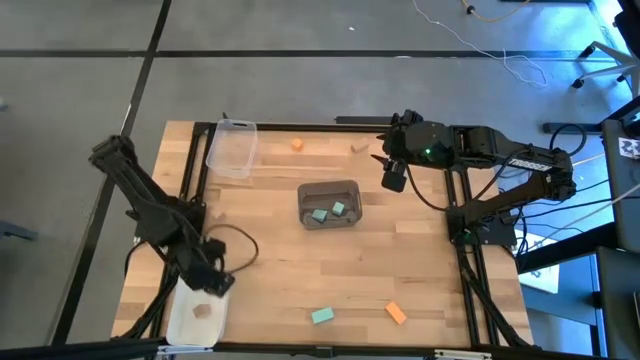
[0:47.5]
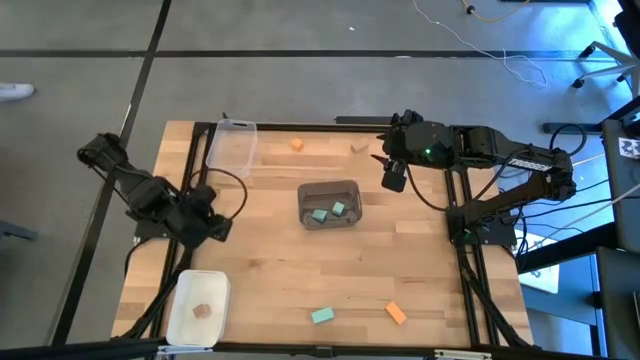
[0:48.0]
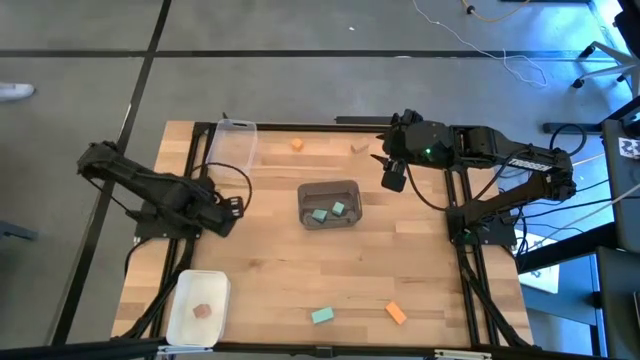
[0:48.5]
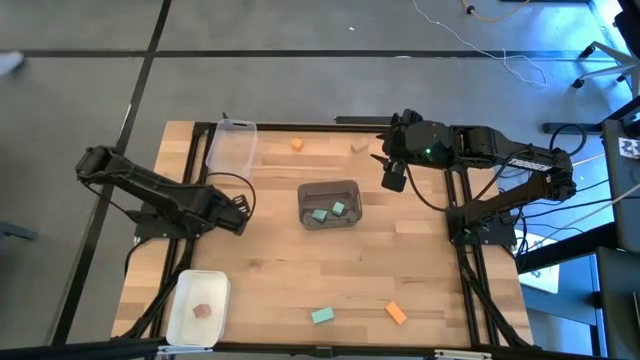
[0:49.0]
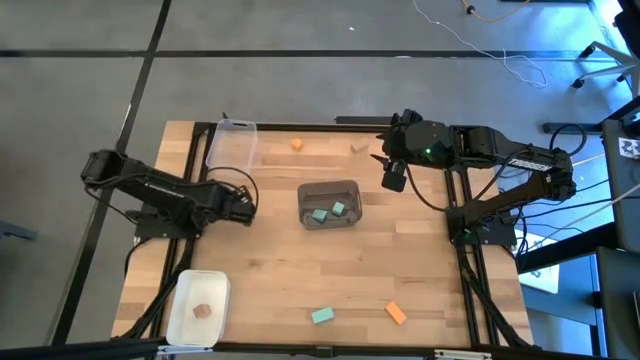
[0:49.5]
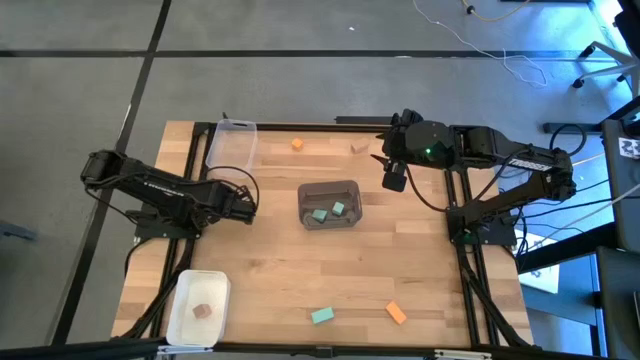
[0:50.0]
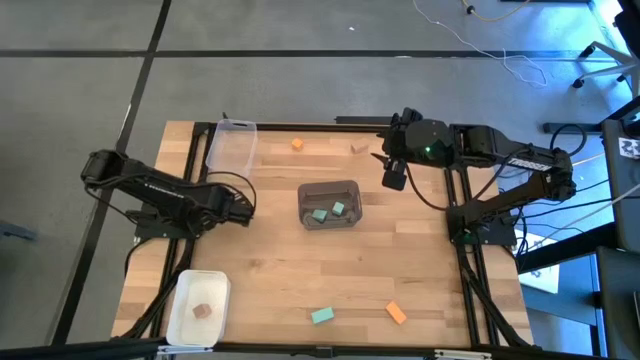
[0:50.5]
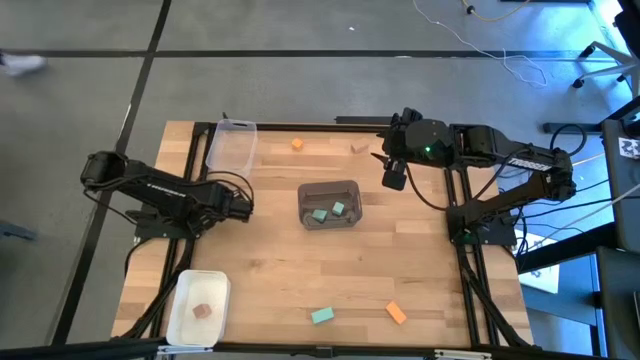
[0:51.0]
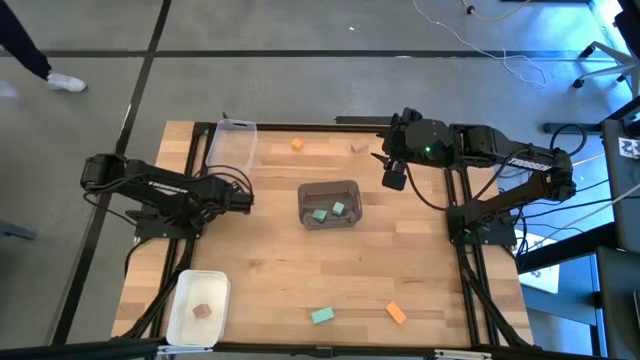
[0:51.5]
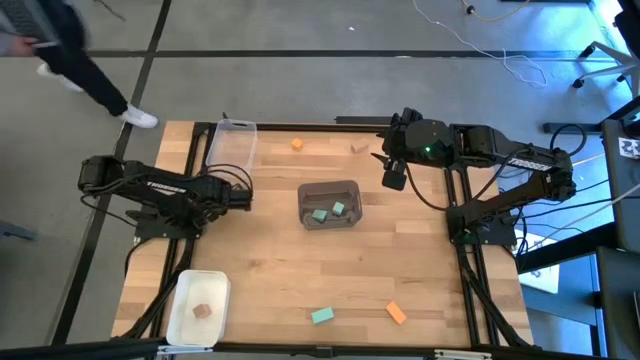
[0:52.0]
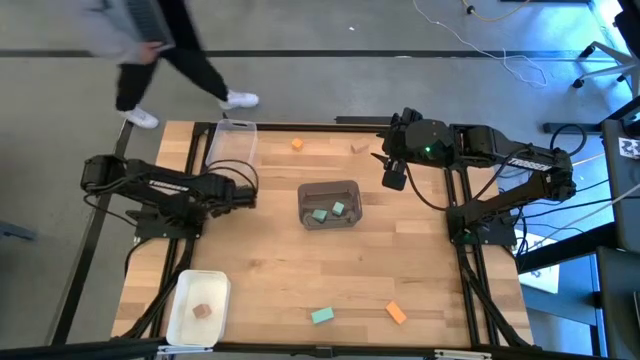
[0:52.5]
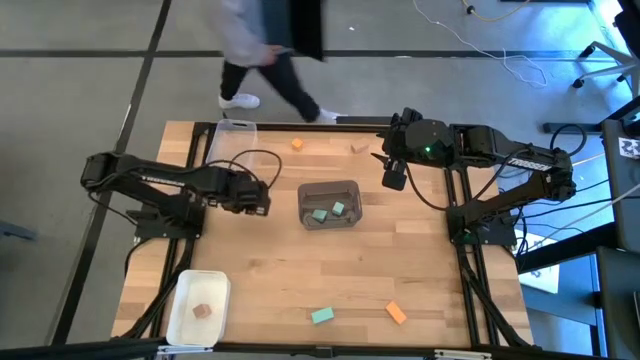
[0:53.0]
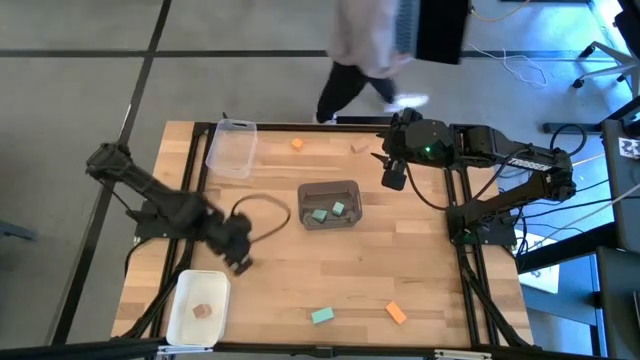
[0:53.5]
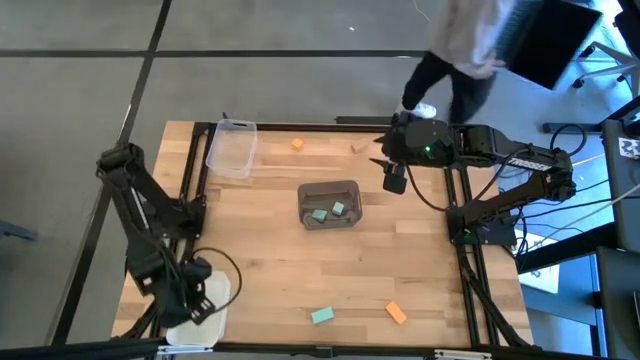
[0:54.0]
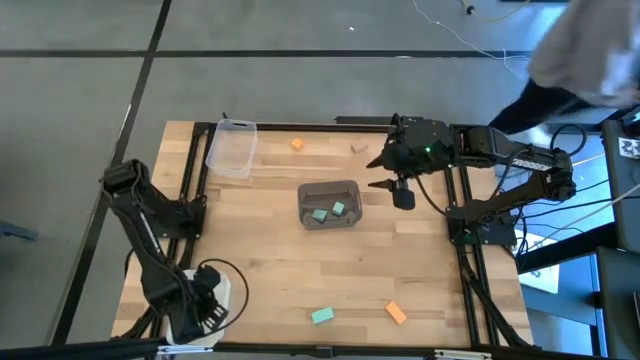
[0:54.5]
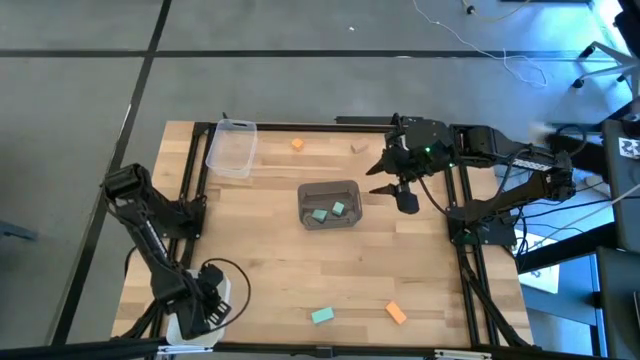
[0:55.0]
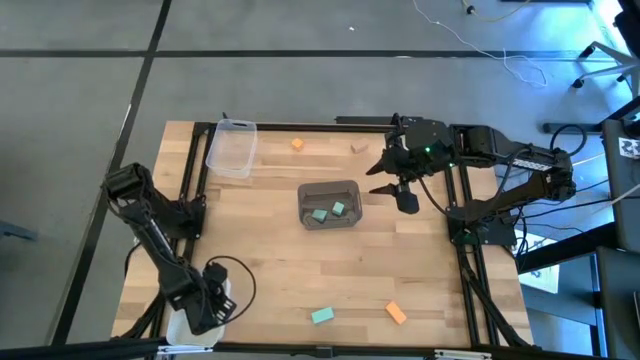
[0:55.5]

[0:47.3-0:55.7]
Task: Sort & place blocks by color
Put the bottom brown block into the white bin

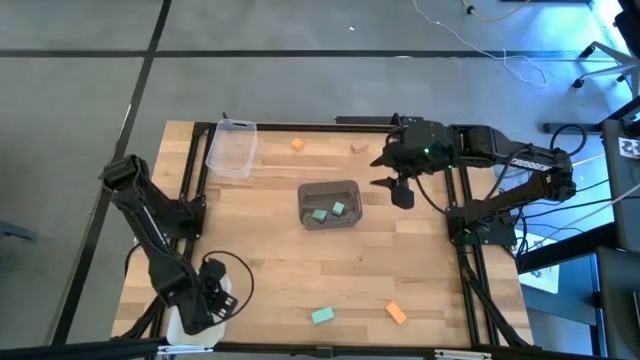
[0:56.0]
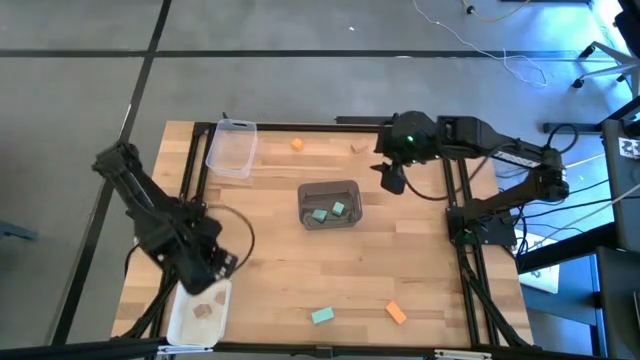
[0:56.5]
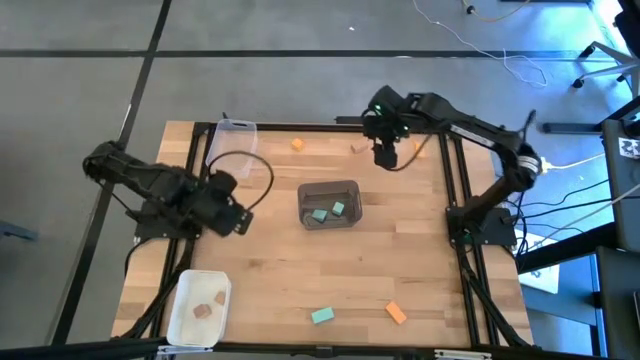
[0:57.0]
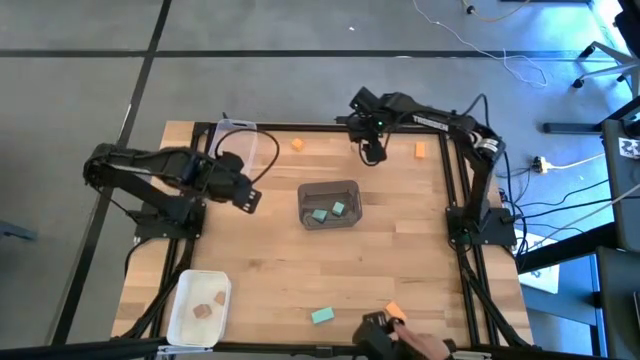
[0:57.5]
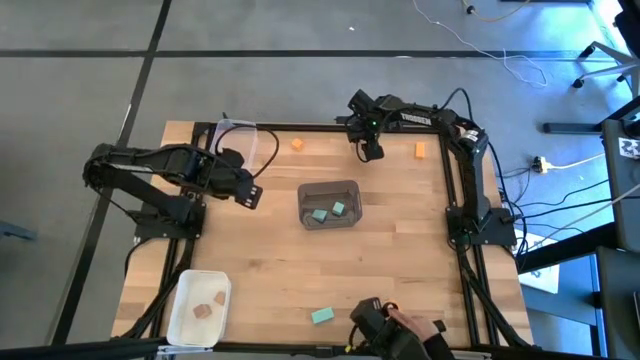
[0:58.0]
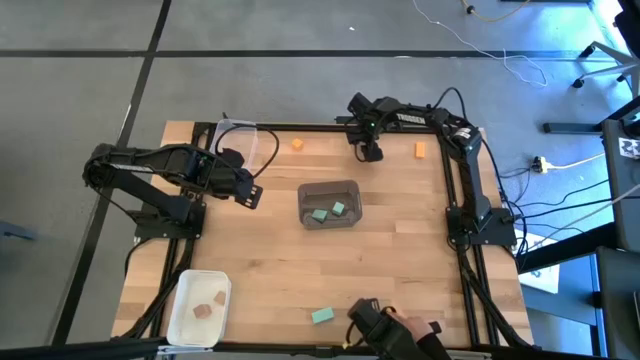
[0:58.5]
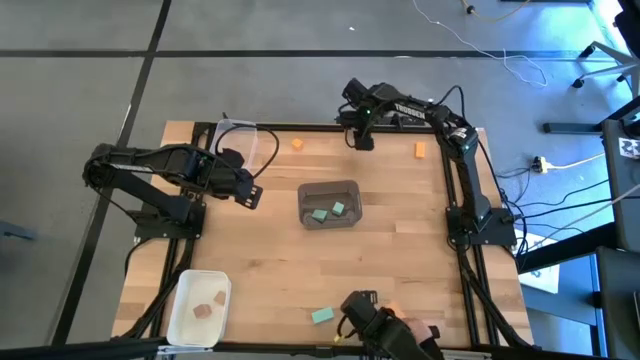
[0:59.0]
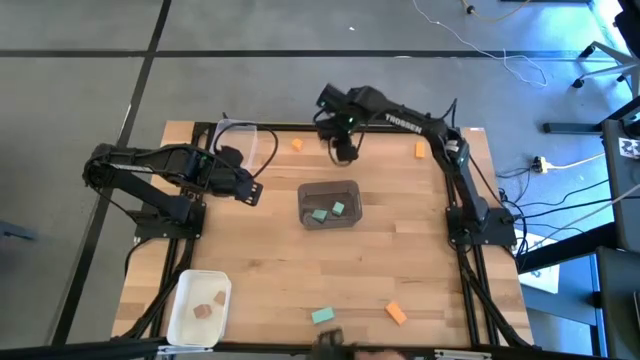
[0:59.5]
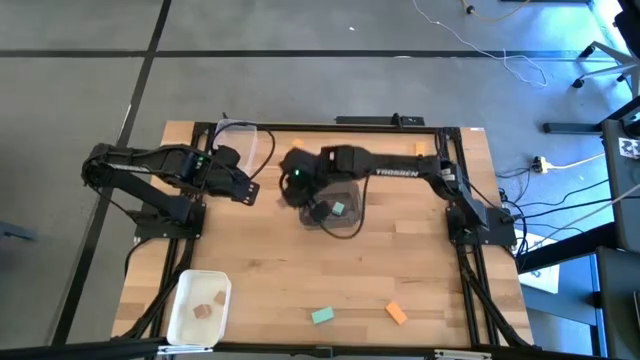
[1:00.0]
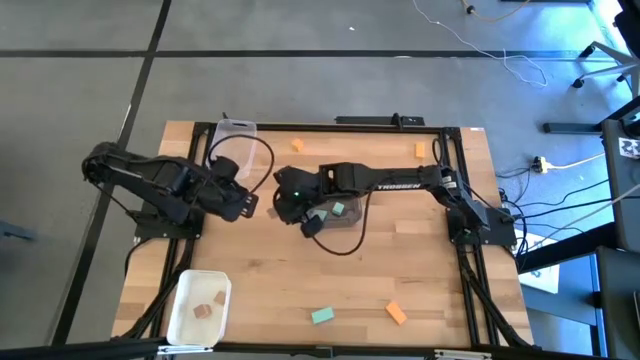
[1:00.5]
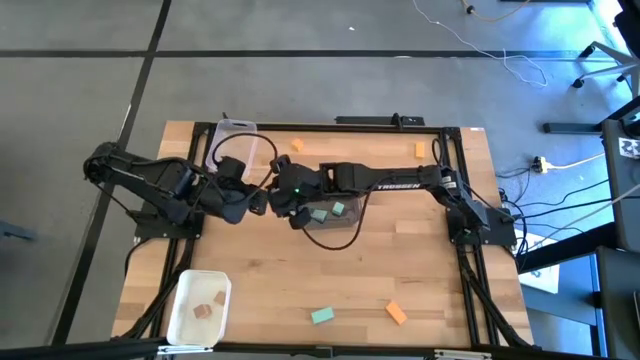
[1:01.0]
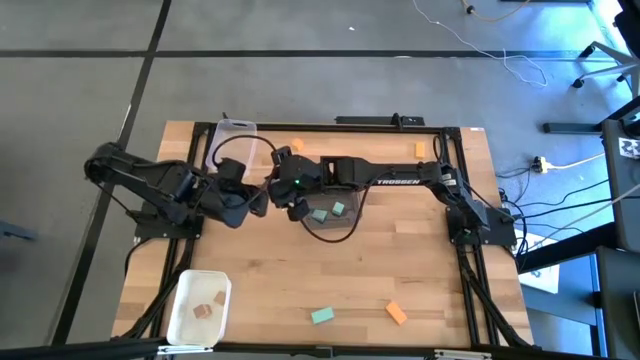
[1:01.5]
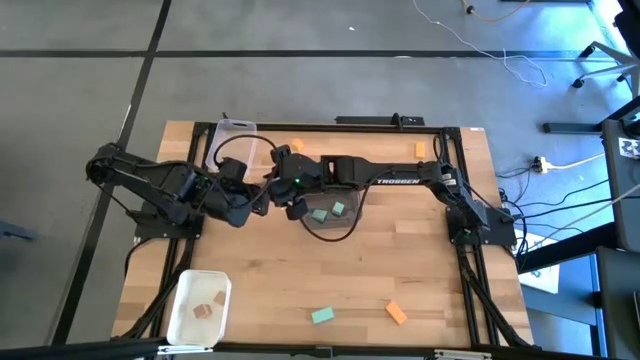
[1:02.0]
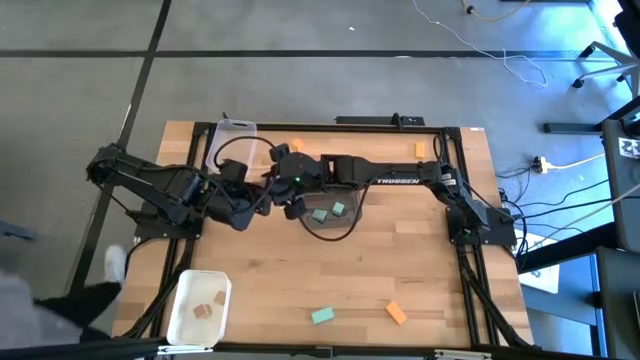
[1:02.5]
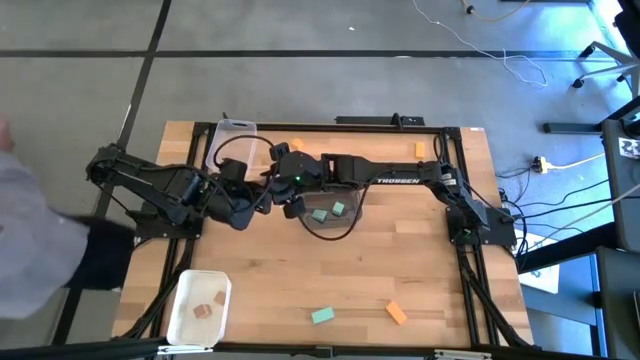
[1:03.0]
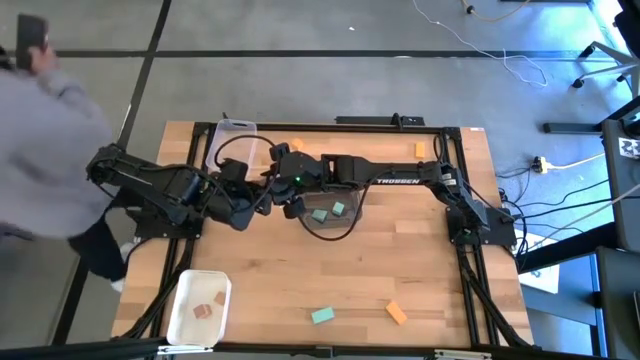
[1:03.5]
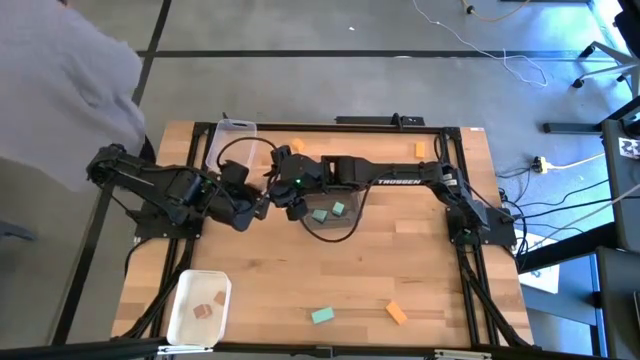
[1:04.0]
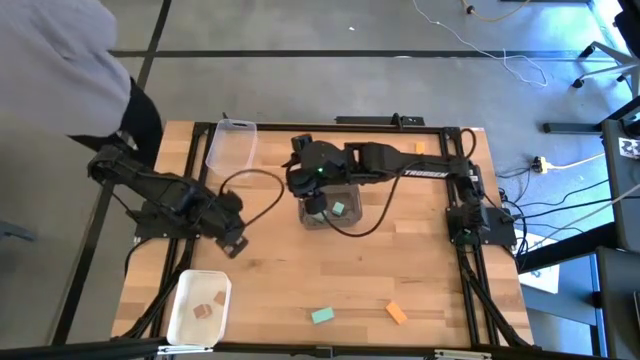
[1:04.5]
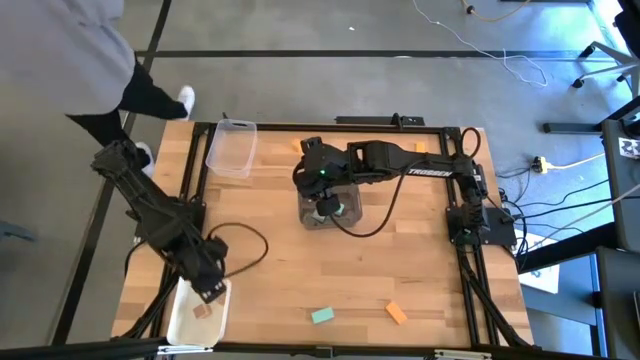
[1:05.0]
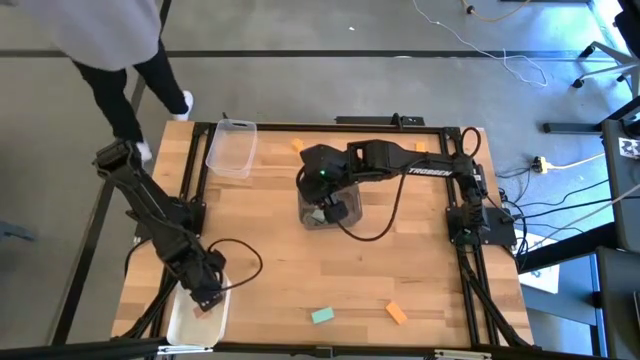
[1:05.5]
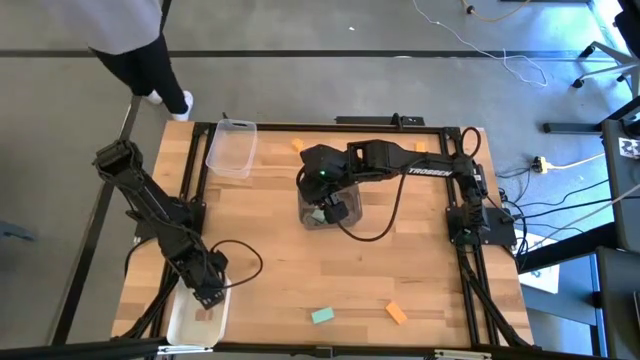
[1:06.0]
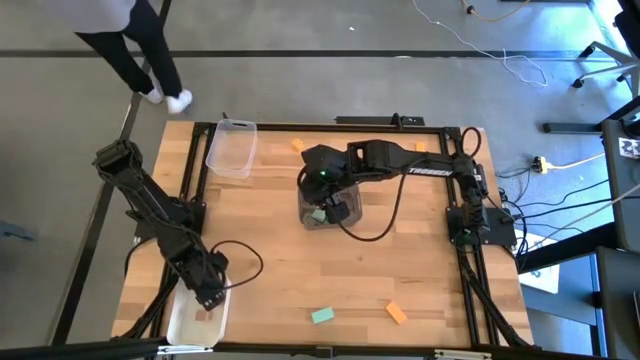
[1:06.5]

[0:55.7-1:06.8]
Put the brown block into the white bin

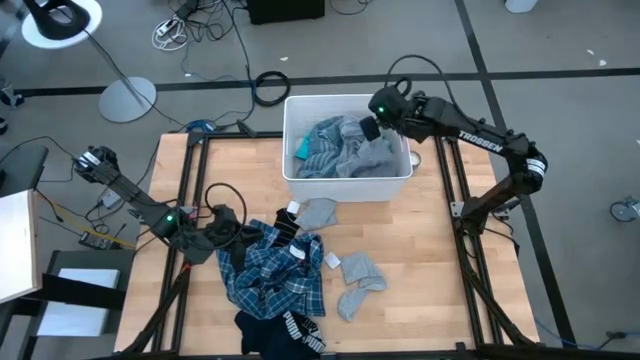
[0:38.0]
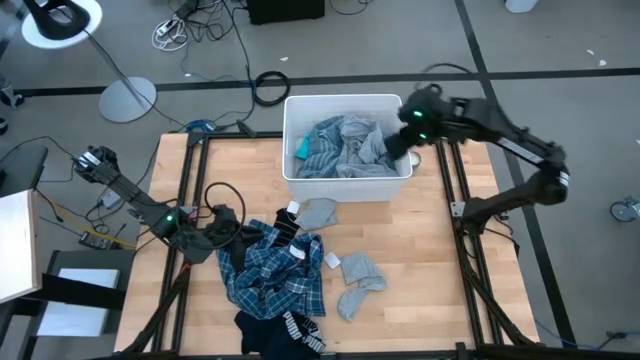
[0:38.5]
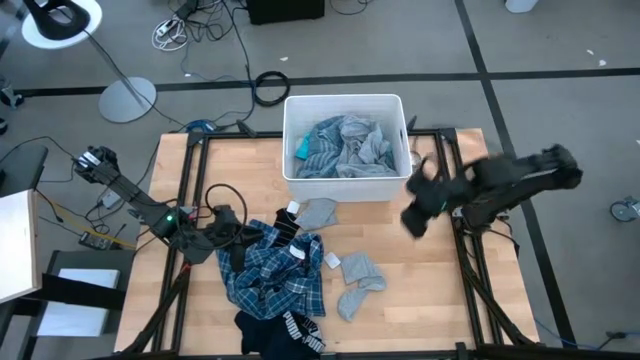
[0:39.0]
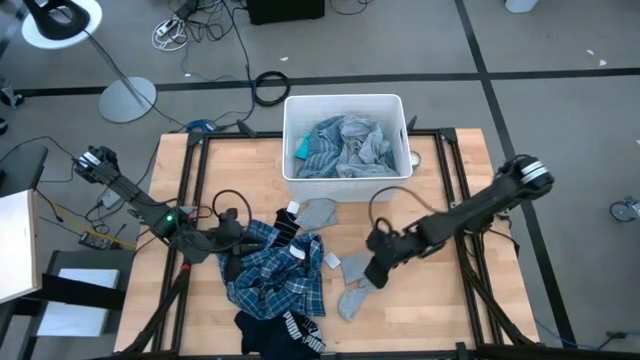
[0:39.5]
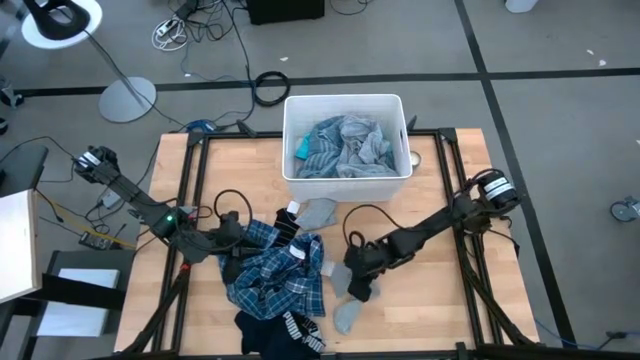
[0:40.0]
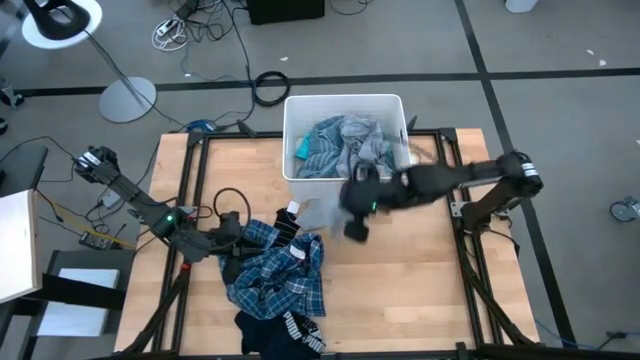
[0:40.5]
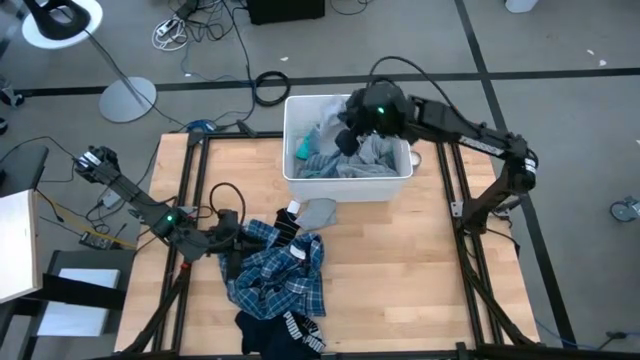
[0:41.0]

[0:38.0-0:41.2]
Task: Sort clothes
Put the bottom gray sock into the laundry bin
